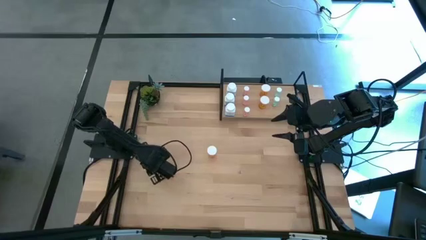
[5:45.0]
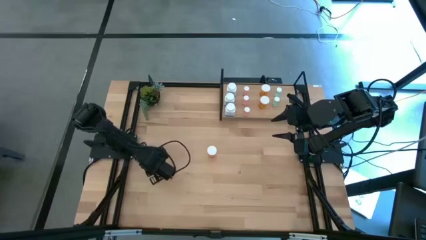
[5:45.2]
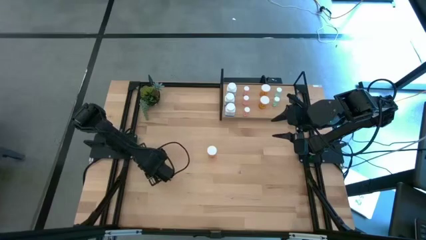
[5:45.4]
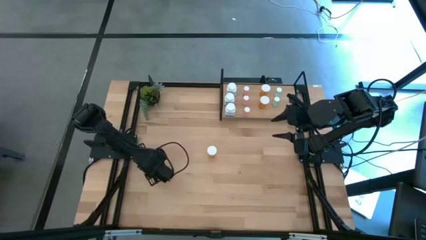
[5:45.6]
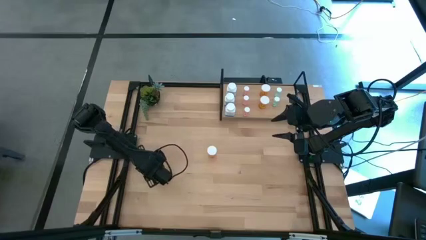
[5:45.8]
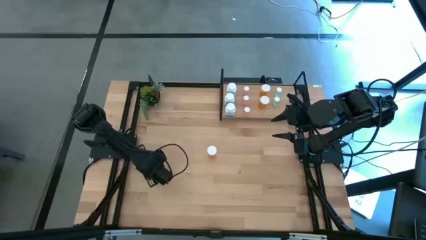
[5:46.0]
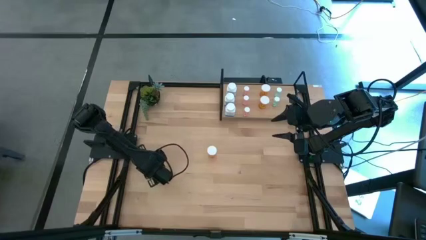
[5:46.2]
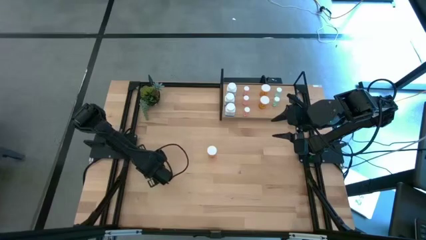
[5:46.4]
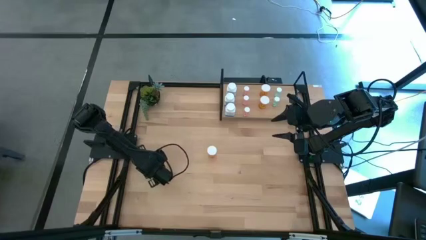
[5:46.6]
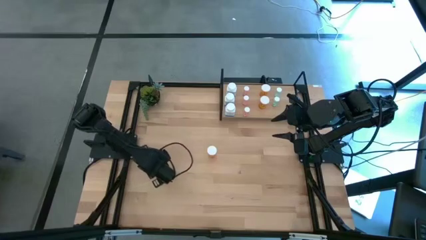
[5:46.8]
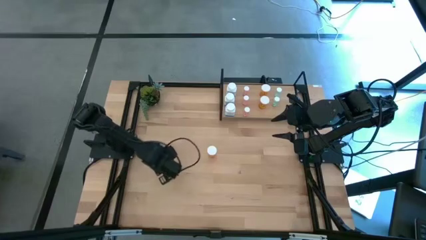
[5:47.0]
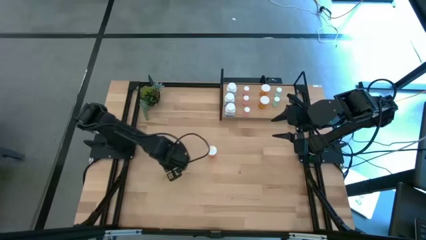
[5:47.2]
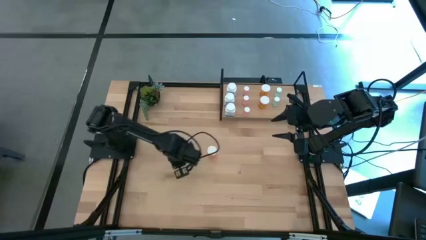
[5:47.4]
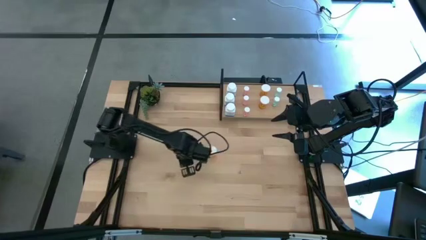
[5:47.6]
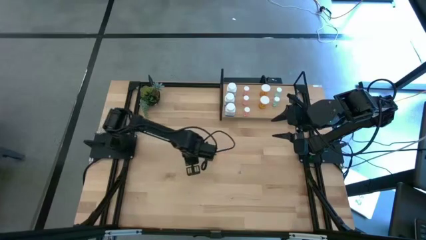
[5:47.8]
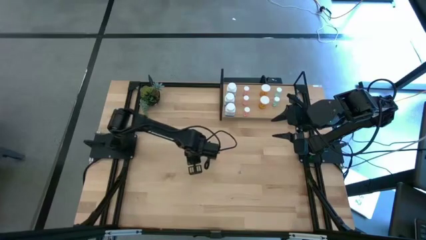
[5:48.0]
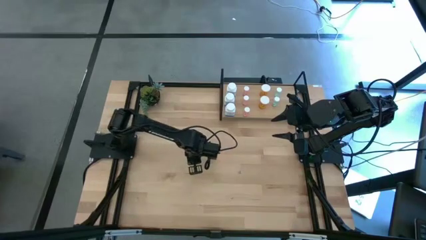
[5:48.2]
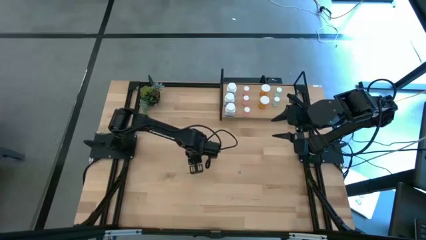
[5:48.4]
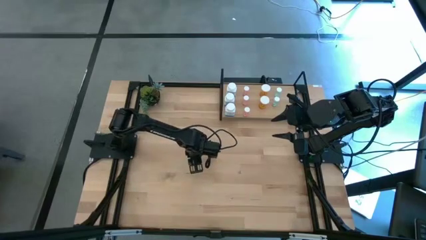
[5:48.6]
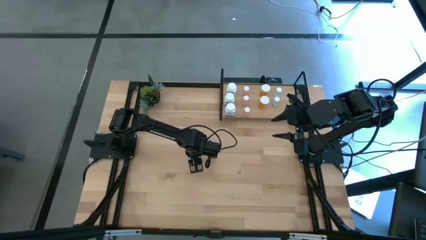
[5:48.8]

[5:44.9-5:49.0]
Task: Pick and place medicine bottles onto shelf by color
Move the blue pill bottle to the center of the table

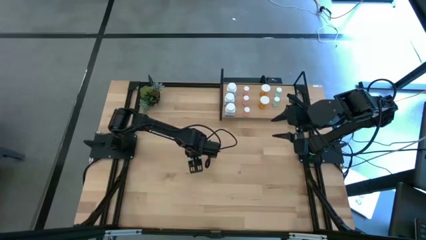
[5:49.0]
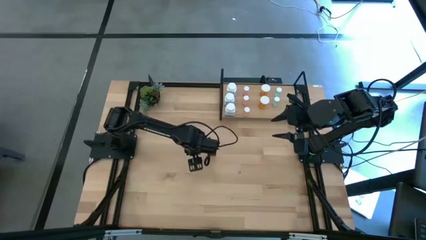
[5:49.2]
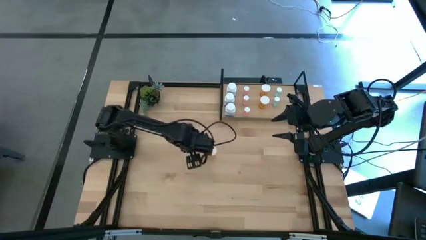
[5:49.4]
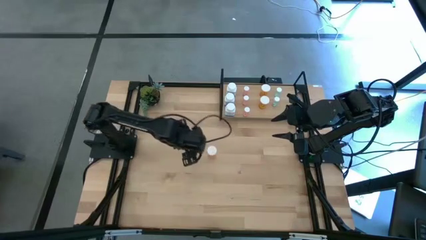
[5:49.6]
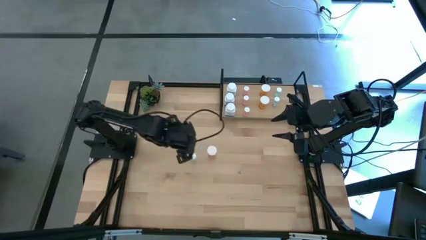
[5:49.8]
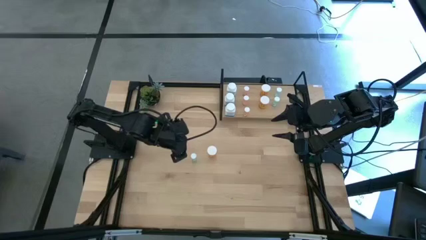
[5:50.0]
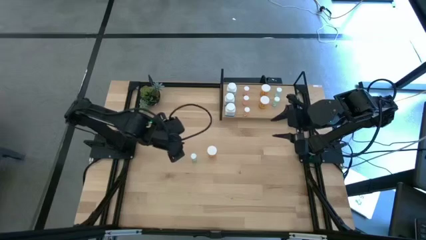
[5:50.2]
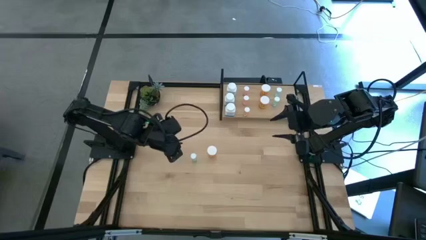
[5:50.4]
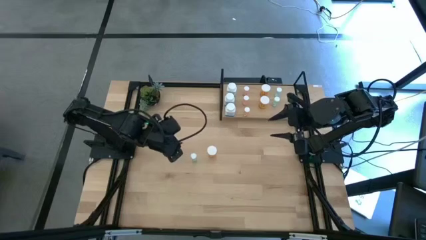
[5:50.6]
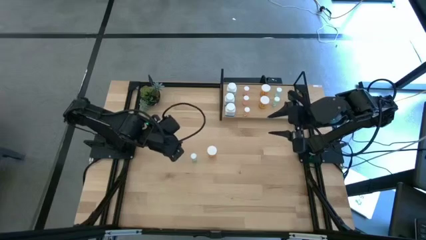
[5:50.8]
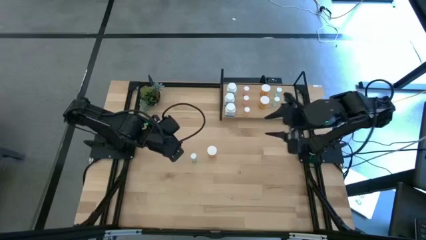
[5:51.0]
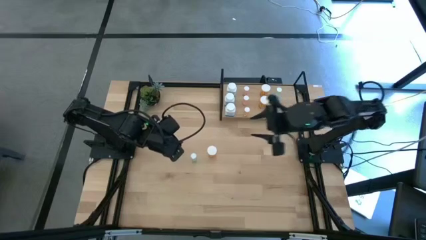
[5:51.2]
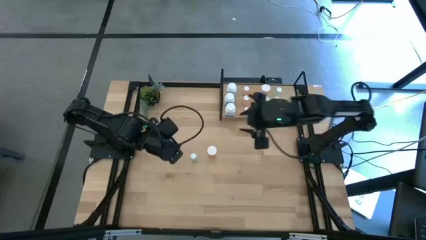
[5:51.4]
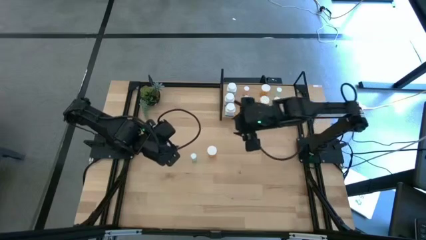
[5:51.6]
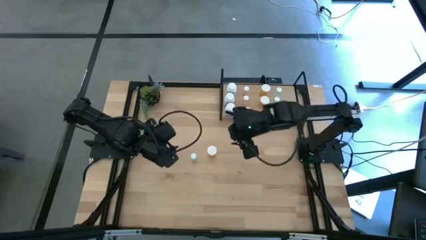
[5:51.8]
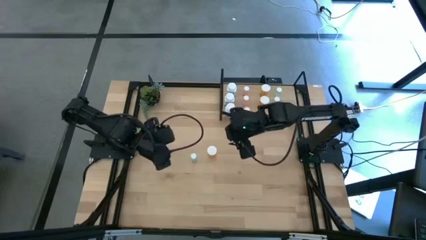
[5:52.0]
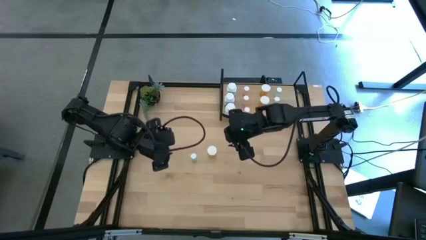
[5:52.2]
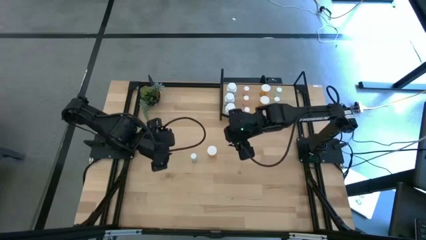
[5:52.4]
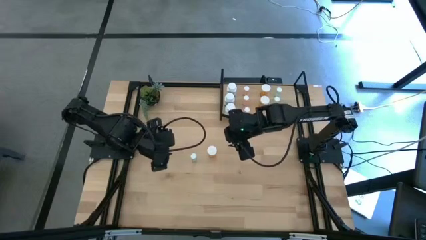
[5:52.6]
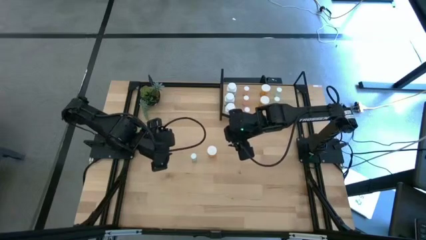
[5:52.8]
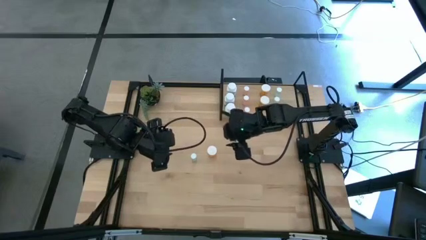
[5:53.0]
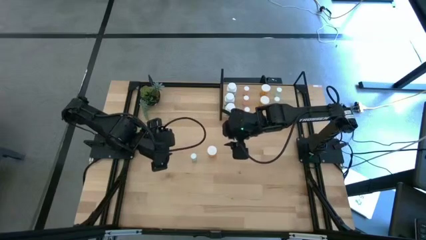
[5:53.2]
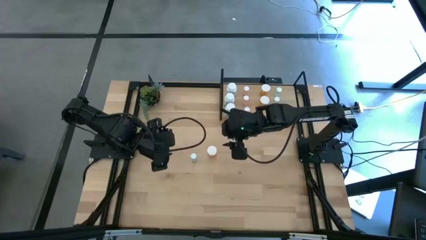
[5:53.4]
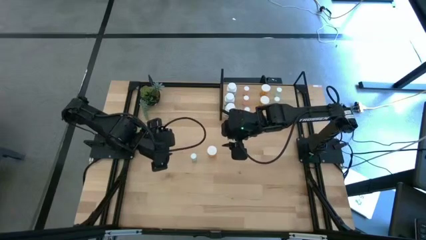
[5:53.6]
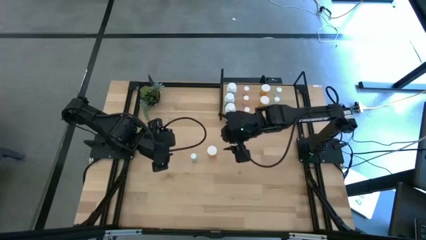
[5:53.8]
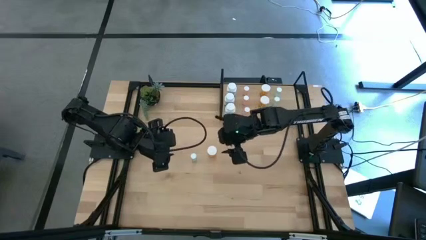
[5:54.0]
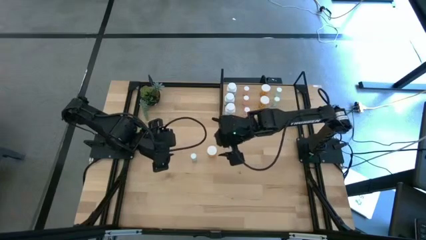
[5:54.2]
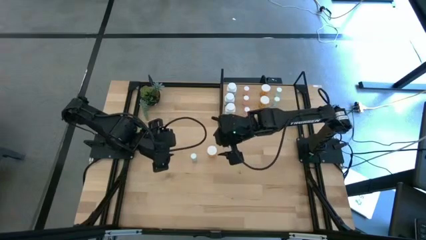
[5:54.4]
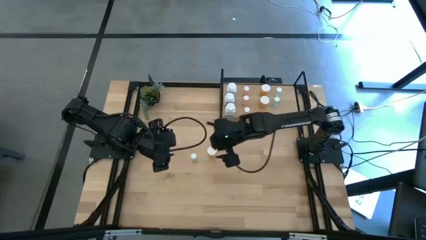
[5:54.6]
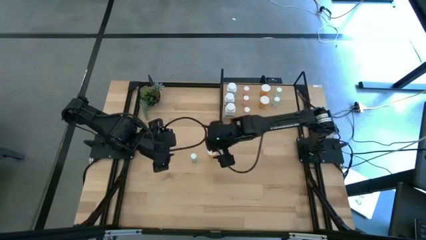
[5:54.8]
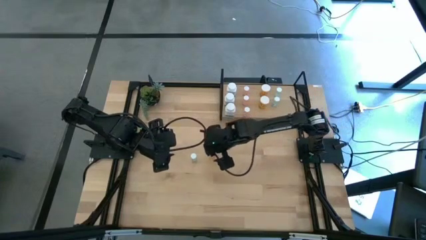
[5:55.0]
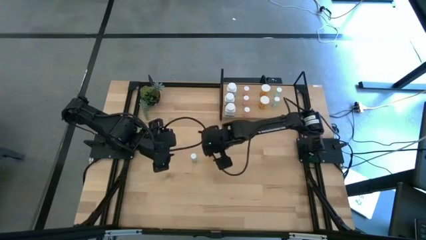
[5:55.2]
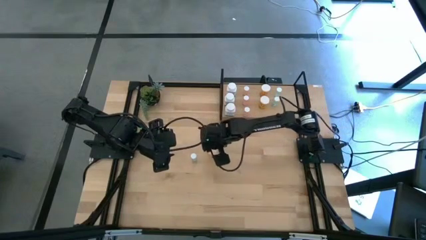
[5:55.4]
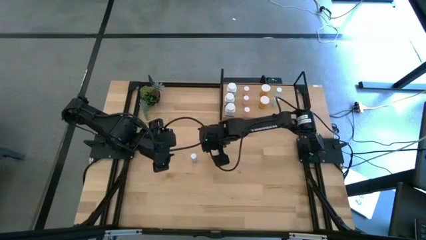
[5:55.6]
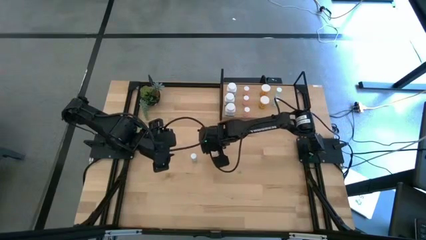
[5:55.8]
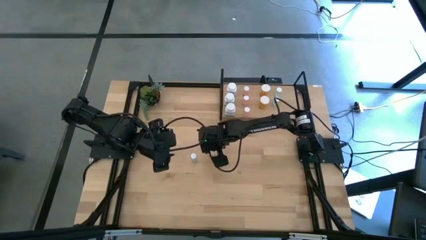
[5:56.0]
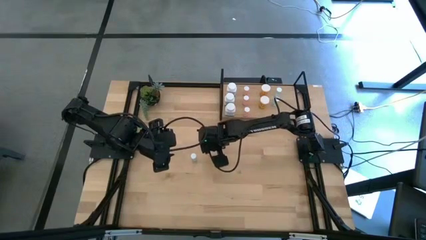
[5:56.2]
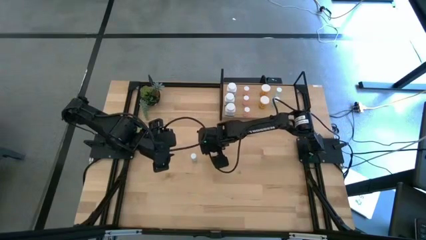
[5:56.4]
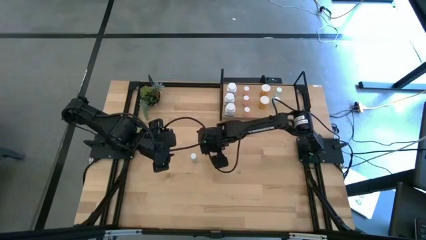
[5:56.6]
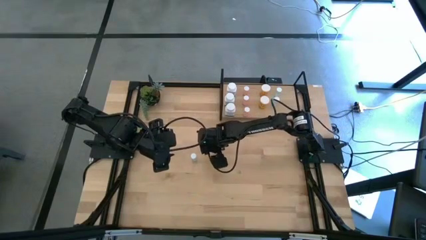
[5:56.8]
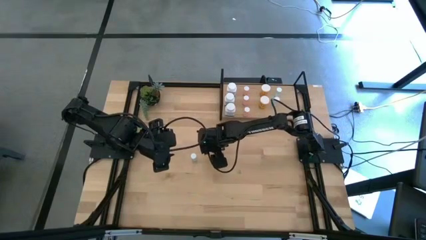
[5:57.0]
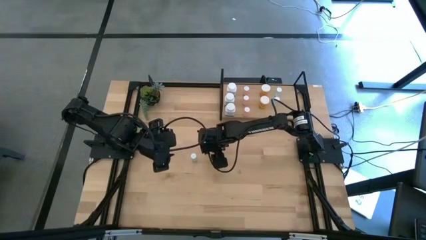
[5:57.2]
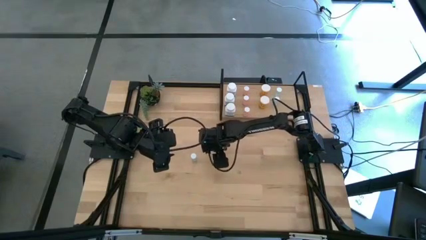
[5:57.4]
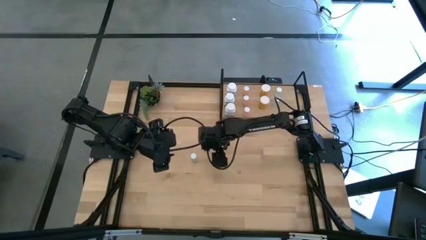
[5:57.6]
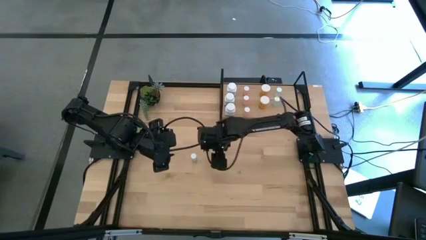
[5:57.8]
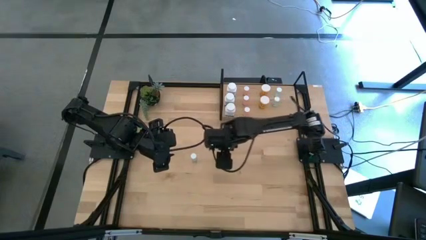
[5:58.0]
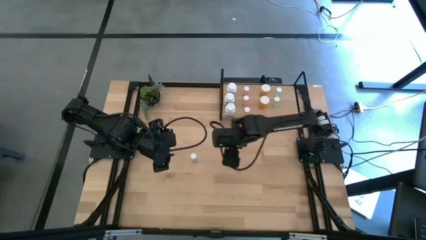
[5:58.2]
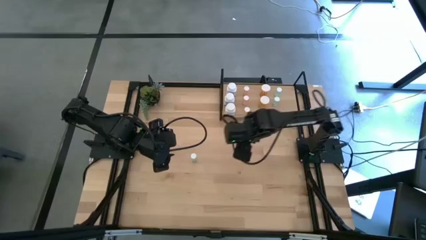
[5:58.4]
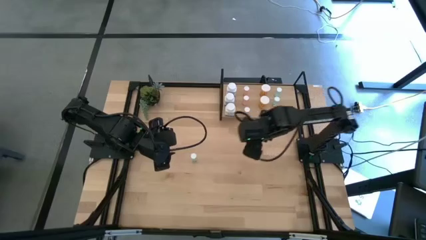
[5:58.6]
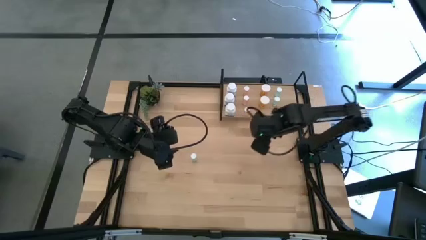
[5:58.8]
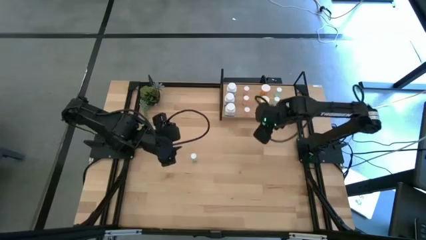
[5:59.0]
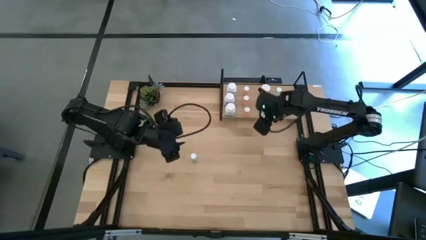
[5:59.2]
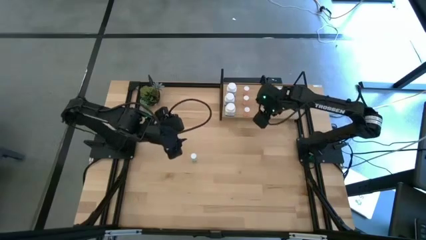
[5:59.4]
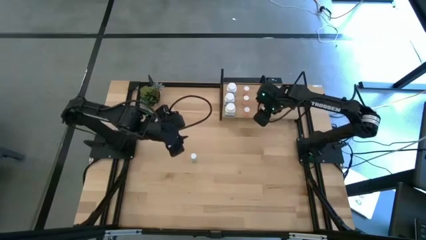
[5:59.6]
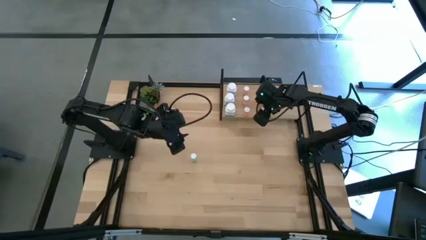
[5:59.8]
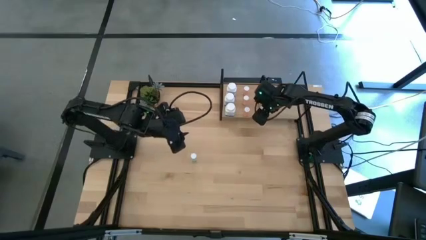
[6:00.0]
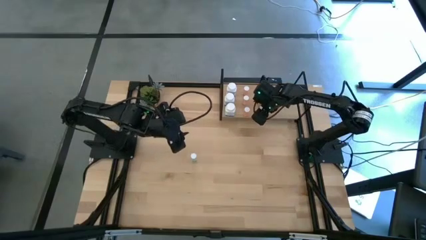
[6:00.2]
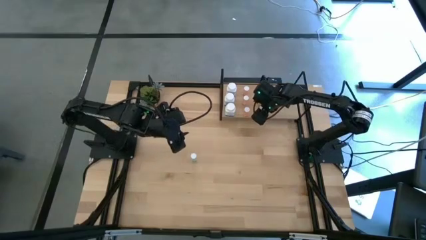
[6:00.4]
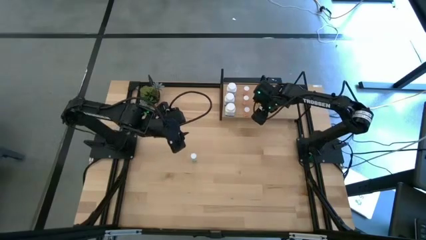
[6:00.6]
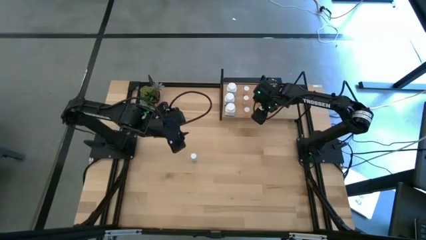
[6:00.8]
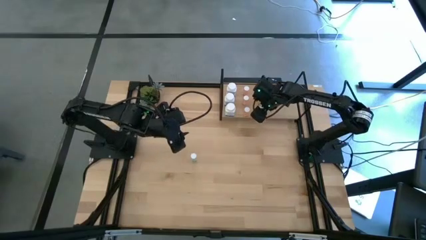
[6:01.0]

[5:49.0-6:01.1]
Put the orange pill bottle on the shelf aligned with the other orange pill bottles
